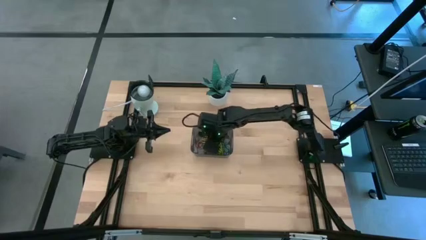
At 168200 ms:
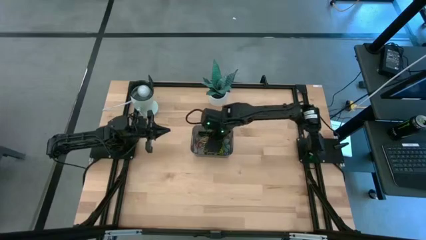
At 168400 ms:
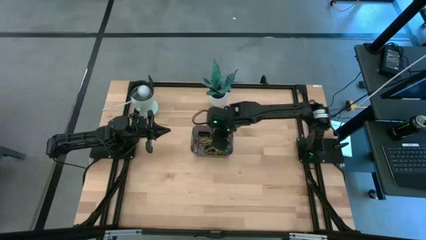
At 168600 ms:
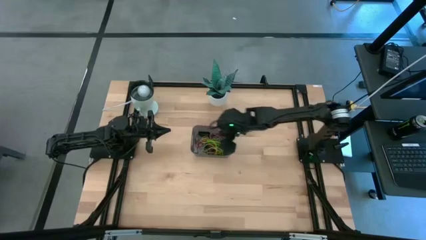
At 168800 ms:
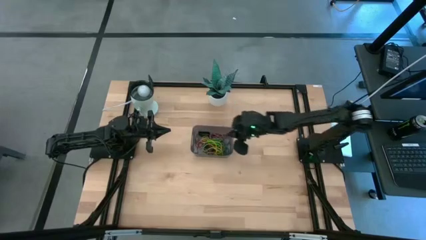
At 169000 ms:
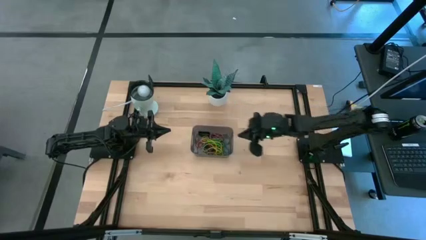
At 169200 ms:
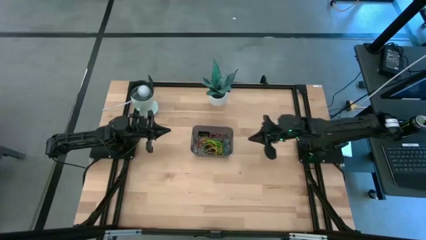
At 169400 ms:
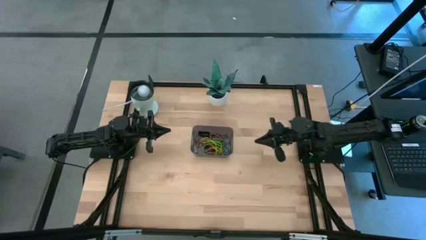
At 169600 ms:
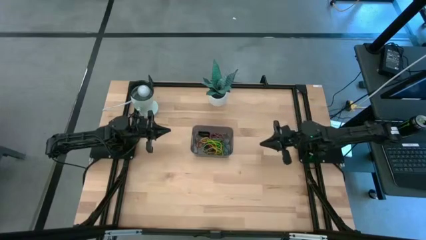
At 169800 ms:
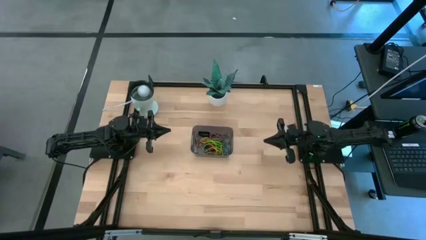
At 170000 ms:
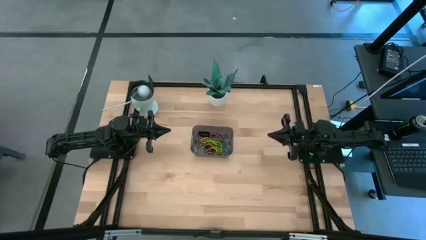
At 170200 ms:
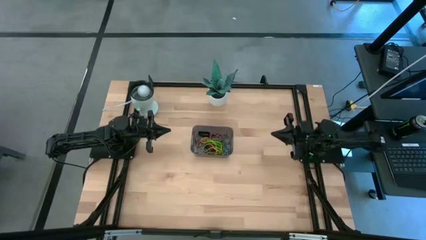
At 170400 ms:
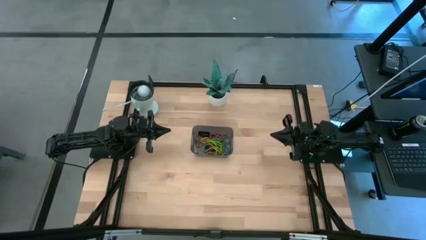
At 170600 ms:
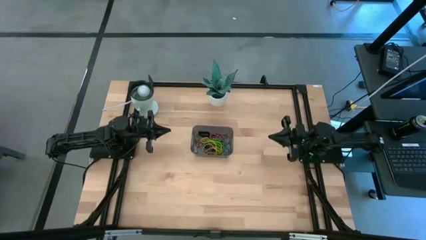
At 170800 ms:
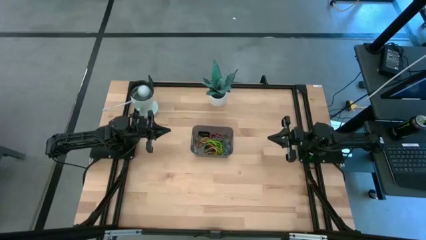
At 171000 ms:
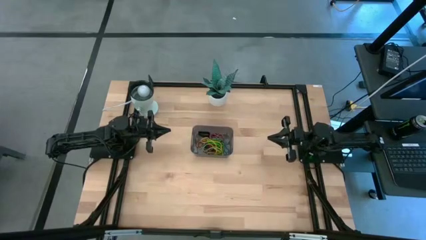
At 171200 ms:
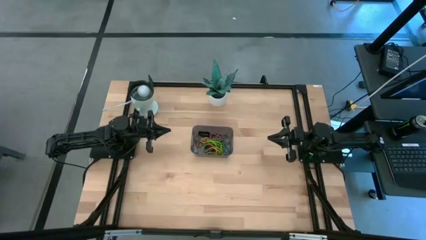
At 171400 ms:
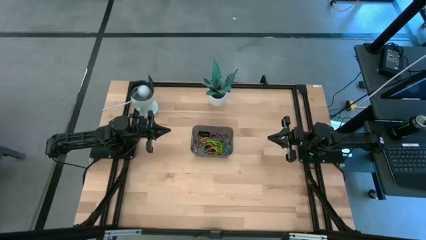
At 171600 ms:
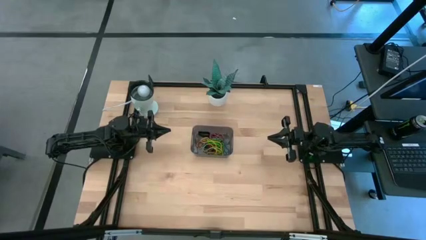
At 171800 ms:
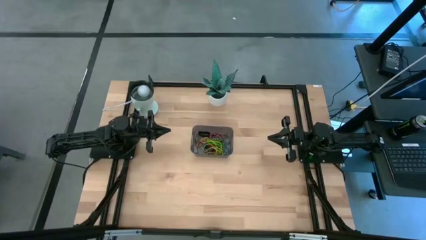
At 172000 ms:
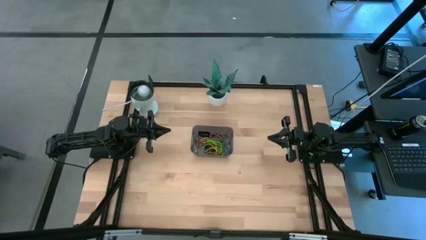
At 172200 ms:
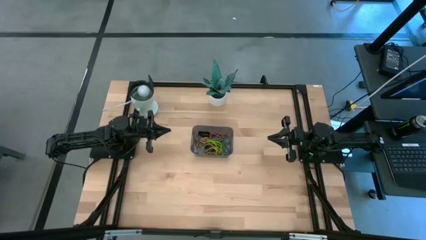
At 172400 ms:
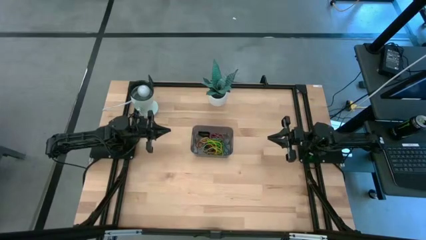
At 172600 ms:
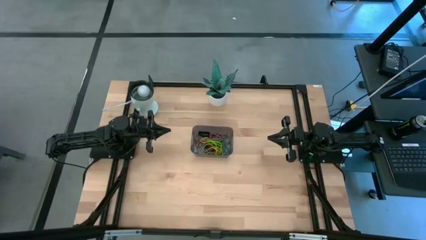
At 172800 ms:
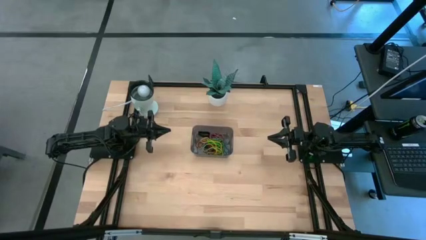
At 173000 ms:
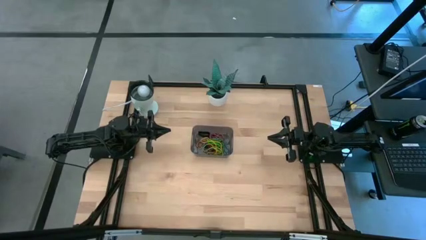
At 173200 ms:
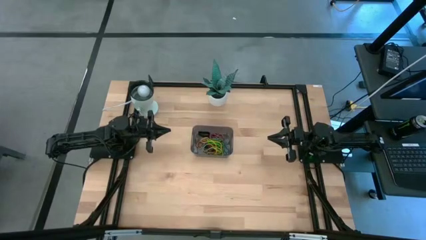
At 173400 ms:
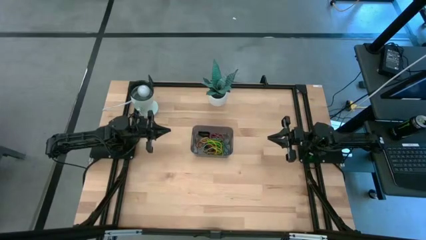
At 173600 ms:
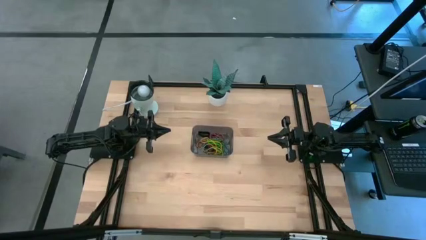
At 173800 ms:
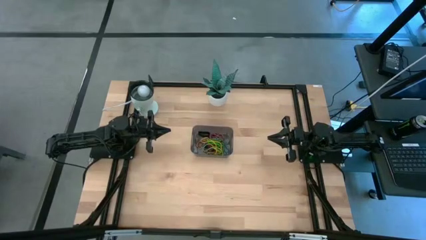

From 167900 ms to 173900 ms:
Task: Pick and place rubber bands into bin
Return to Home Position

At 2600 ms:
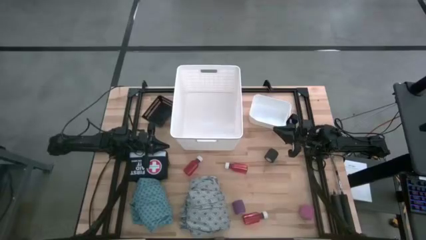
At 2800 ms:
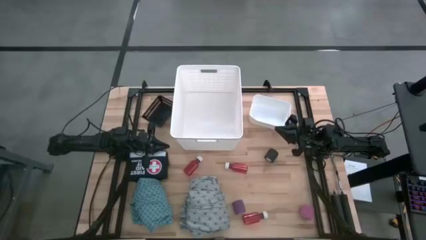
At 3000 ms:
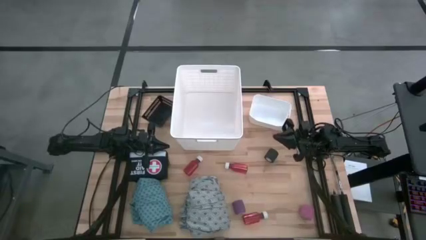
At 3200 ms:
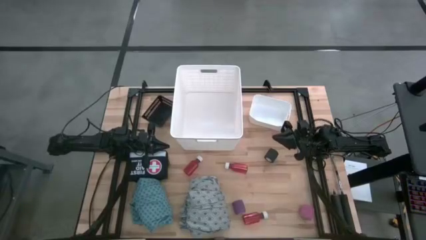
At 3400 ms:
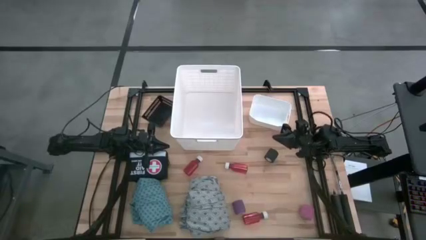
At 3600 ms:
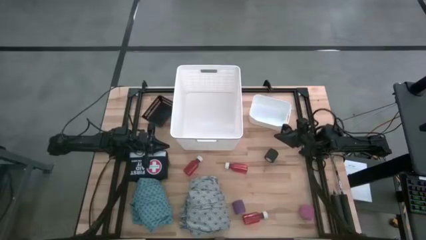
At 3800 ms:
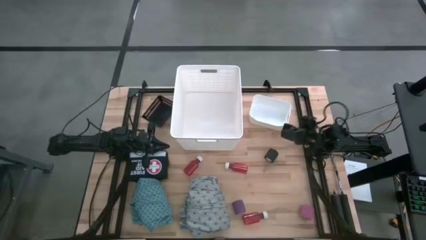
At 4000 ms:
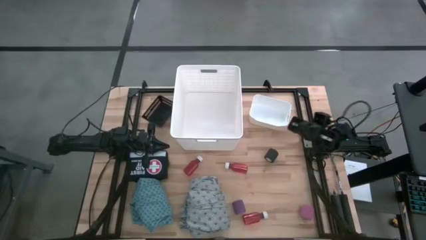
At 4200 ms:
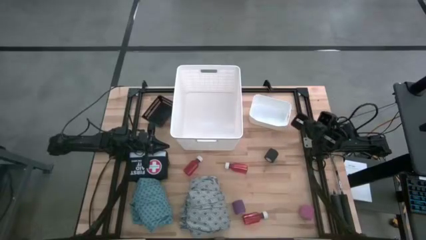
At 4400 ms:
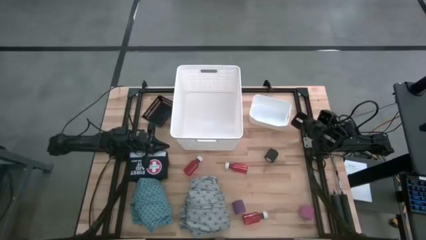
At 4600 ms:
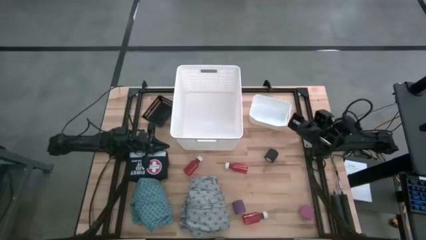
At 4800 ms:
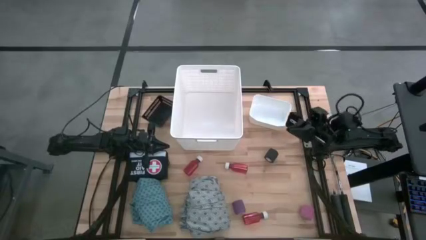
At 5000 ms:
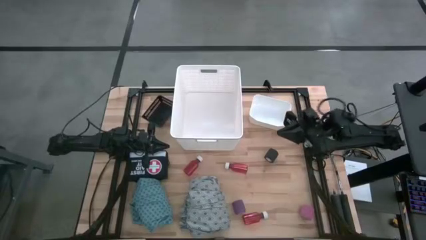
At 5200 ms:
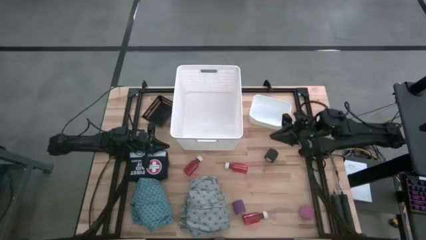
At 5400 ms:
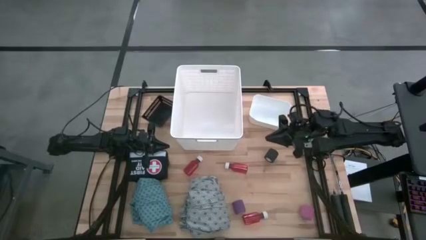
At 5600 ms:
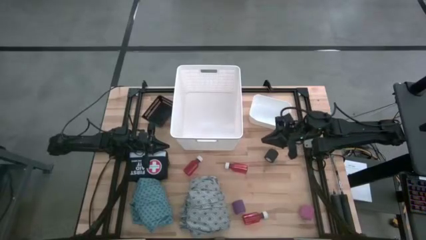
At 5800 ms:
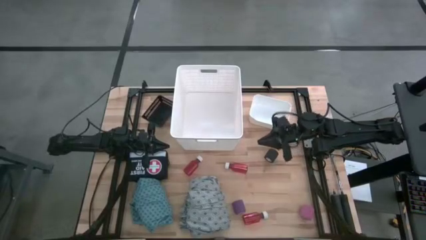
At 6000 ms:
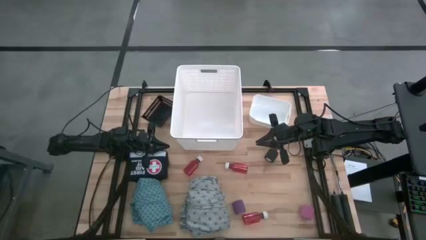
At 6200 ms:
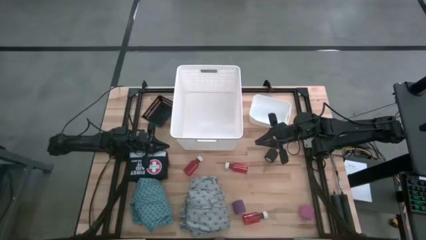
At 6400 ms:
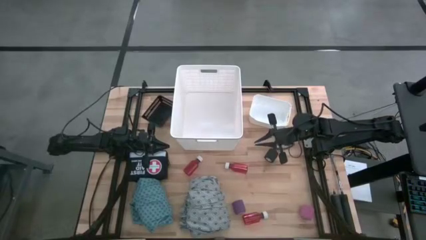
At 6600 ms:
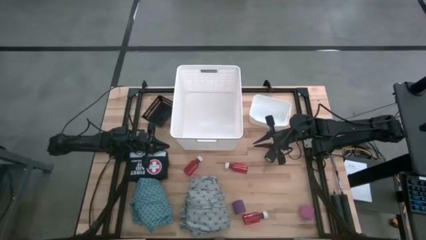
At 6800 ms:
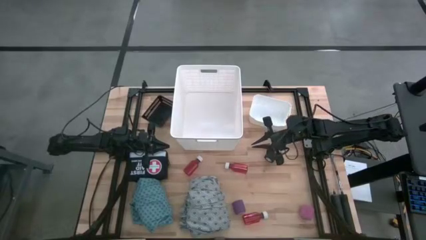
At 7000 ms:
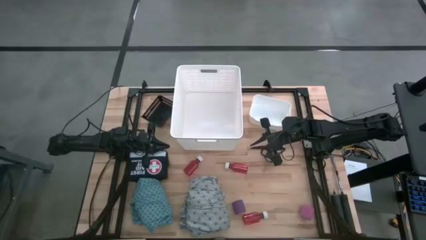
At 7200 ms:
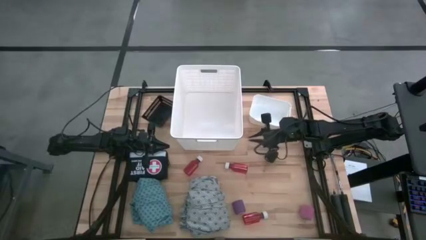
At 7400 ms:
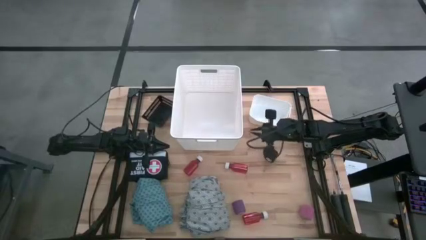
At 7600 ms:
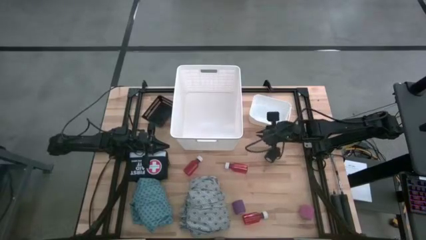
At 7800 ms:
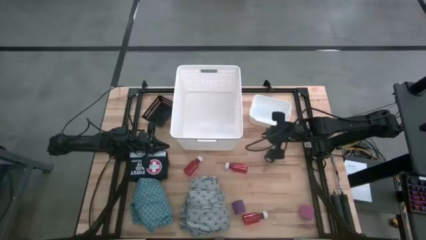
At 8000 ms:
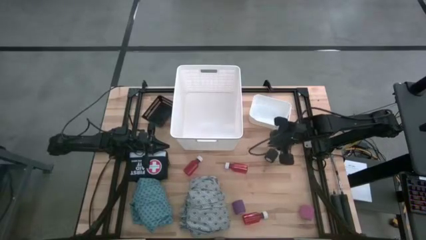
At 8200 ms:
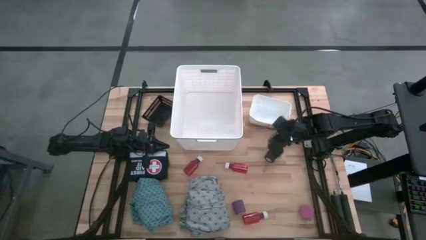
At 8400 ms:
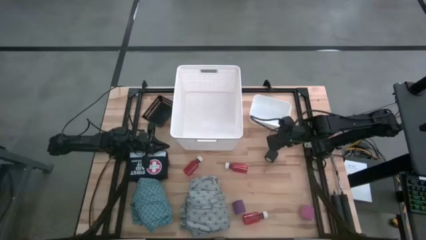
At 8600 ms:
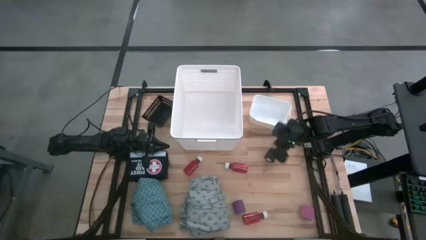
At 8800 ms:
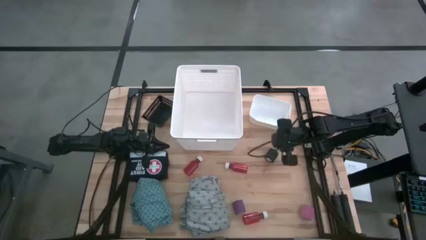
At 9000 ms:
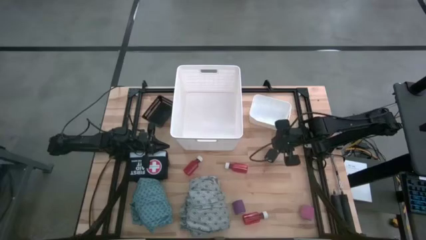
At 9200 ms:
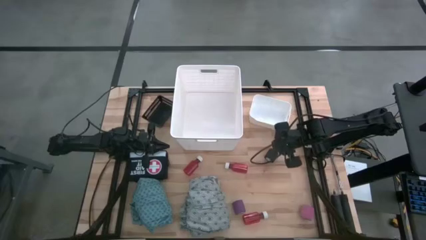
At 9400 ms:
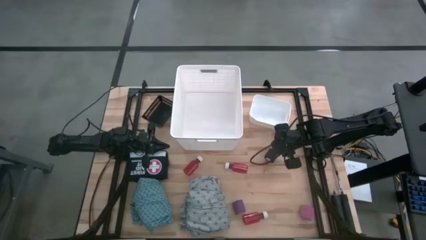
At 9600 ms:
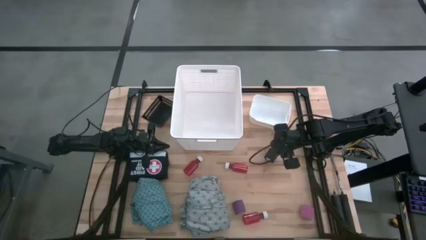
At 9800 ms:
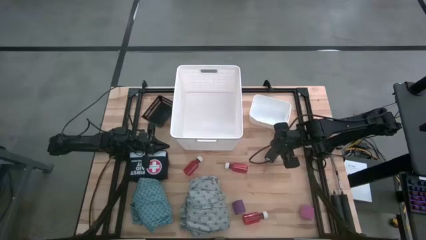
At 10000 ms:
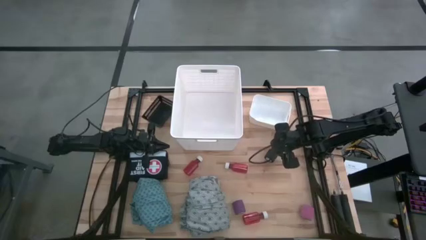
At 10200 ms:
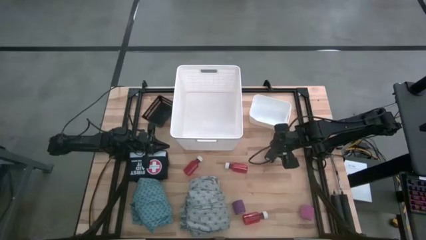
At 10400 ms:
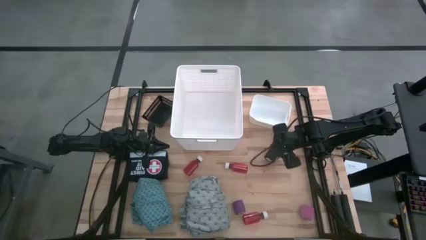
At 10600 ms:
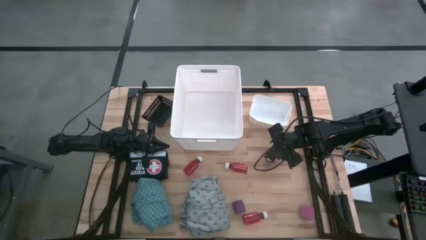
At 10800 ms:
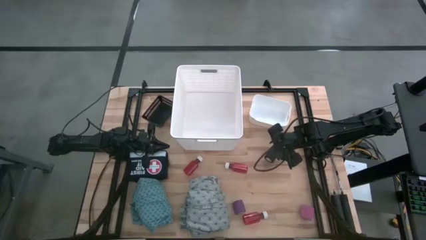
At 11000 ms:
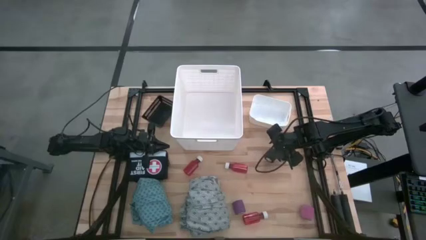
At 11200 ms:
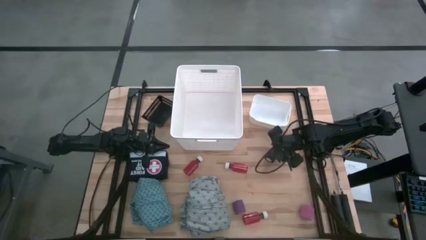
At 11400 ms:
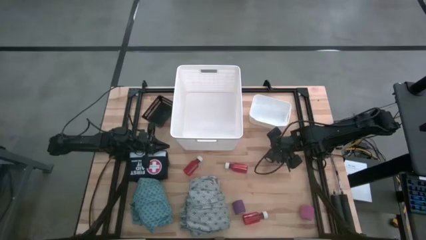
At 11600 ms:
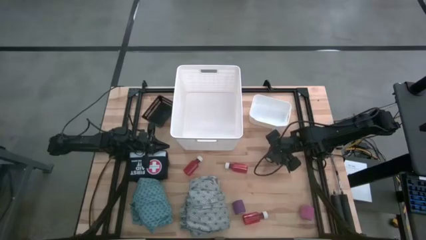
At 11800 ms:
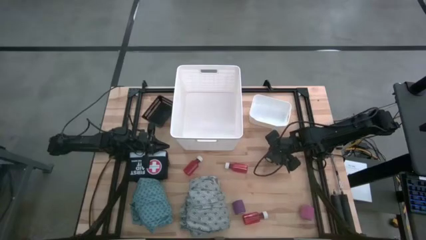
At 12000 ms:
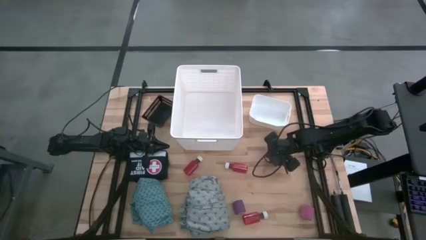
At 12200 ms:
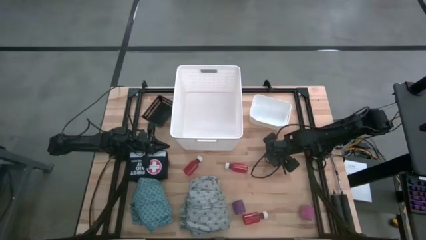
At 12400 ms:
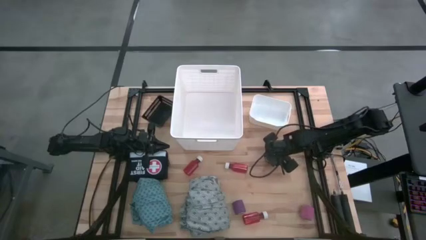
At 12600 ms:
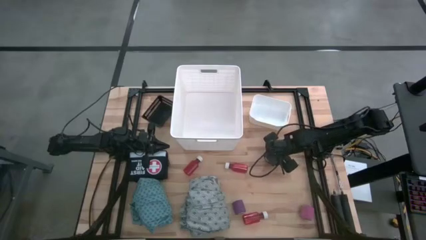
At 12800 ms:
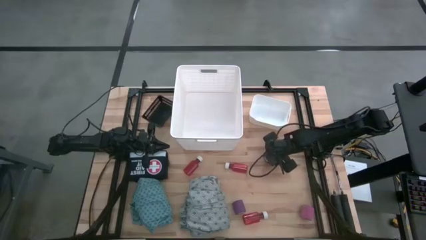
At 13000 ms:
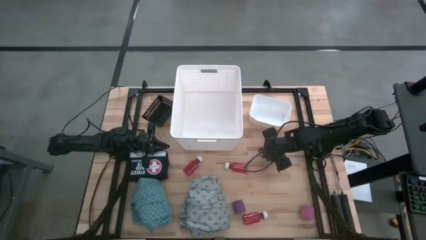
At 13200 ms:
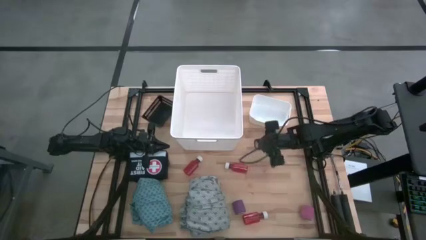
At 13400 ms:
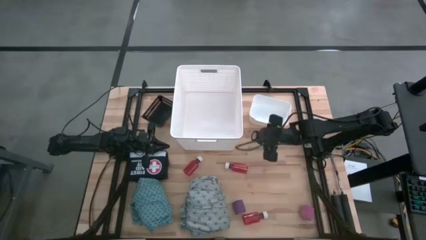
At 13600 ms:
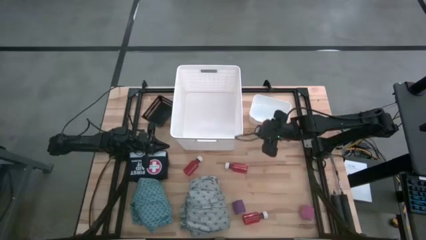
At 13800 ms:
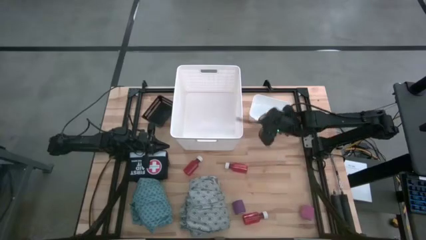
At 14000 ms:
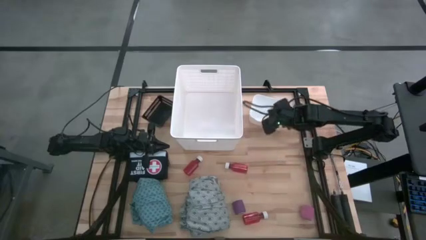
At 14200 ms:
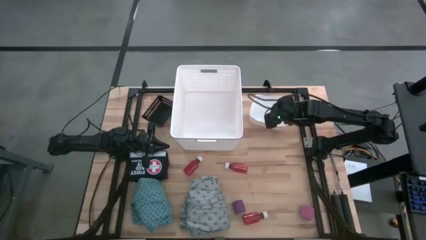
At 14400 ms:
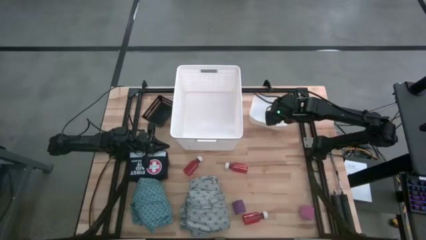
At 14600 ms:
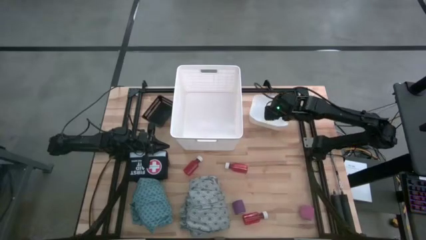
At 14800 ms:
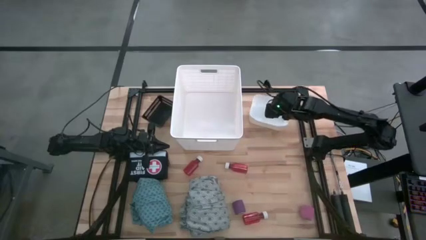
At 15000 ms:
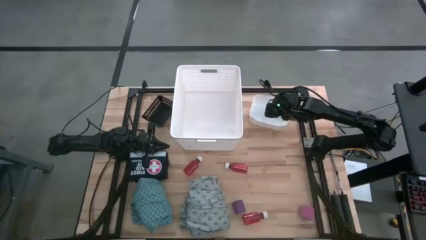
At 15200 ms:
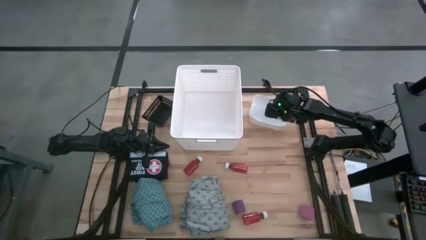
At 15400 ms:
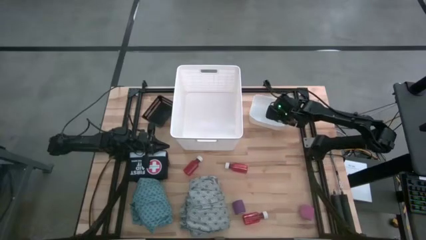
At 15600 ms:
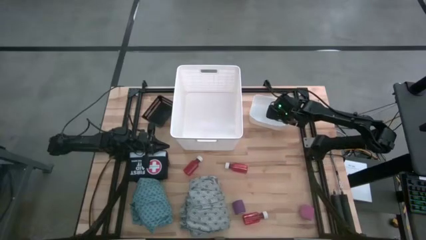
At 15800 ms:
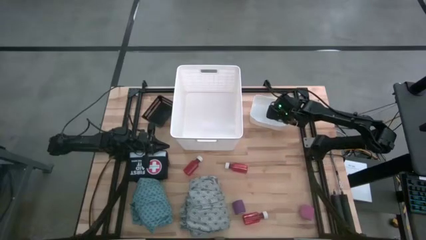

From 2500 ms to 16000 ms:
Task: Pick & Place Medicine items
Put the black bandage into the white bin
